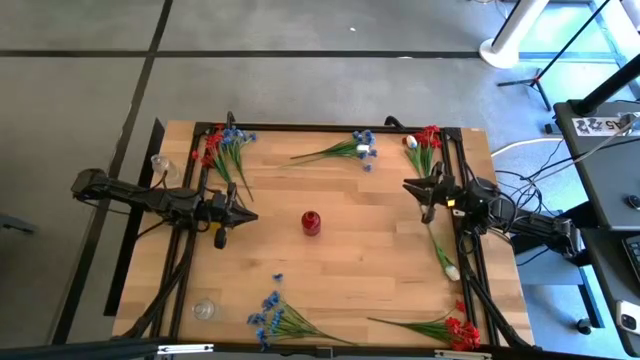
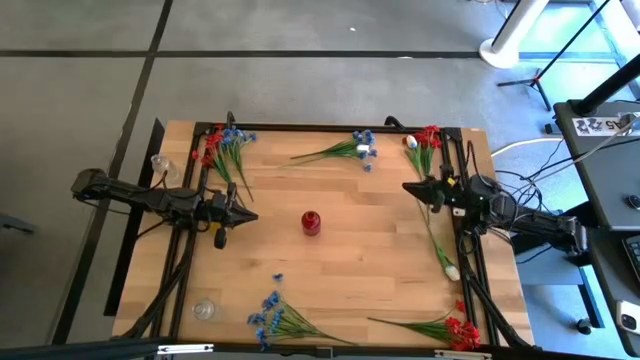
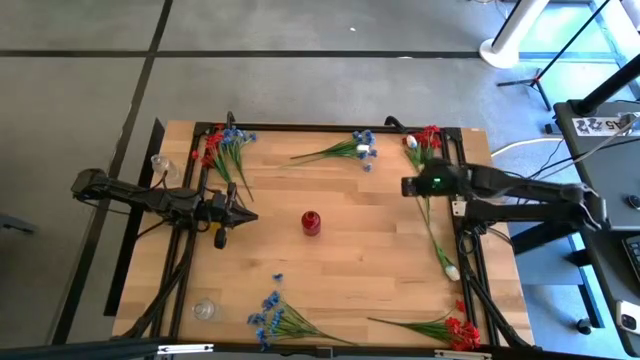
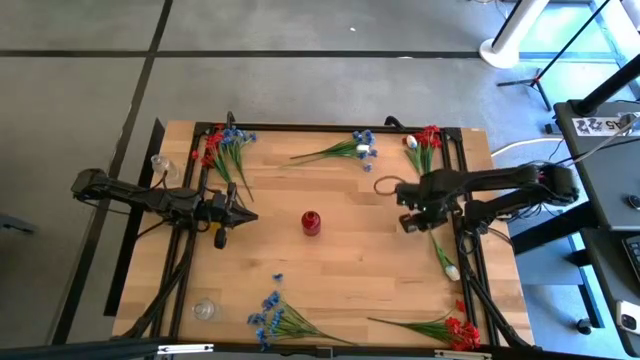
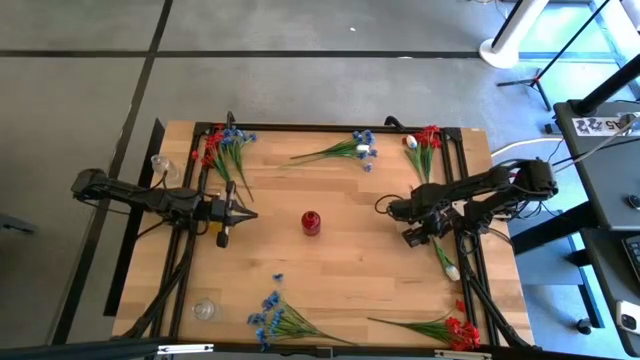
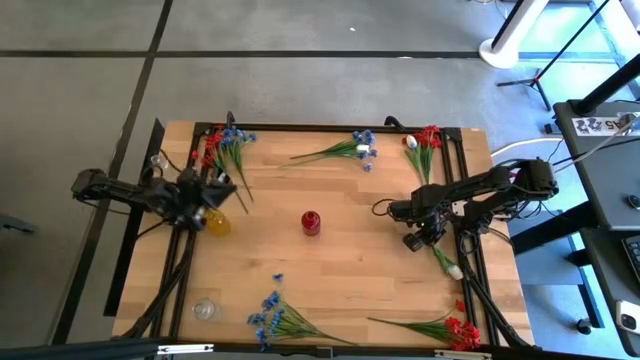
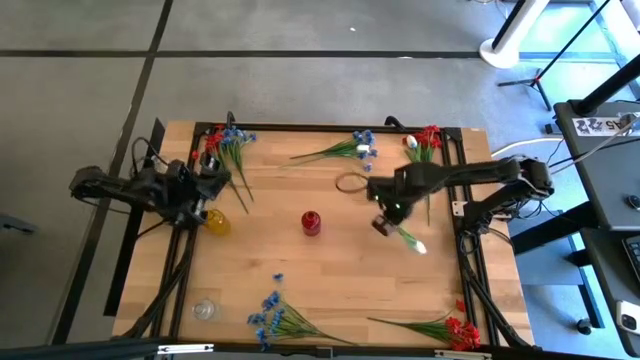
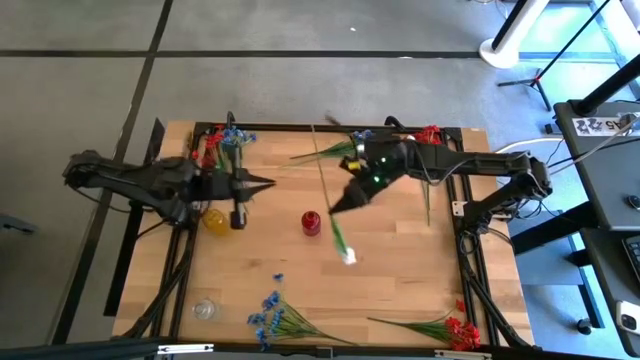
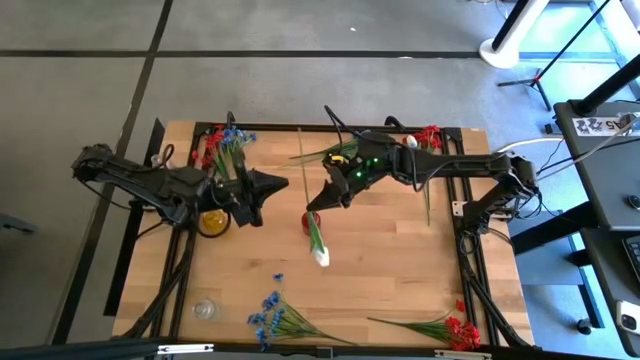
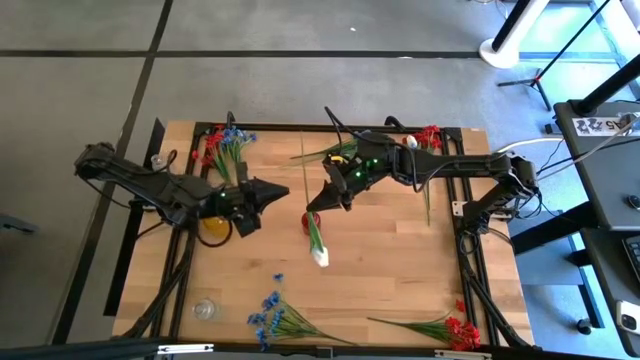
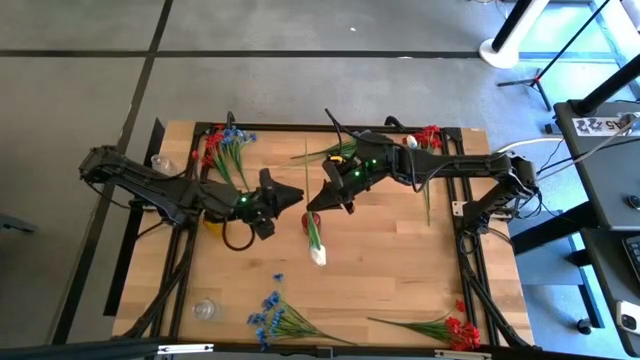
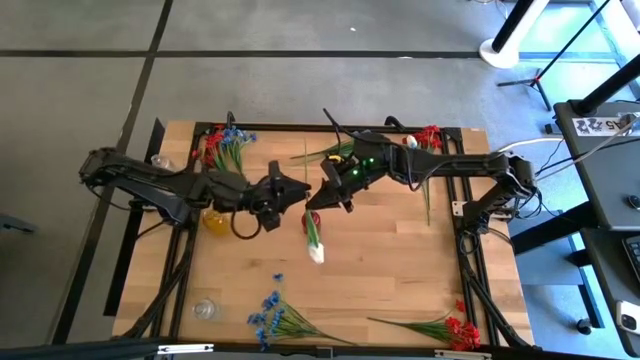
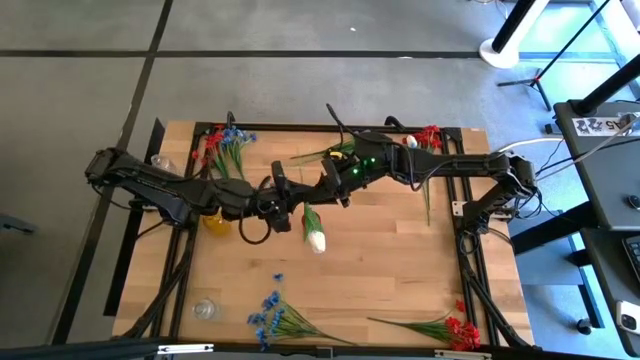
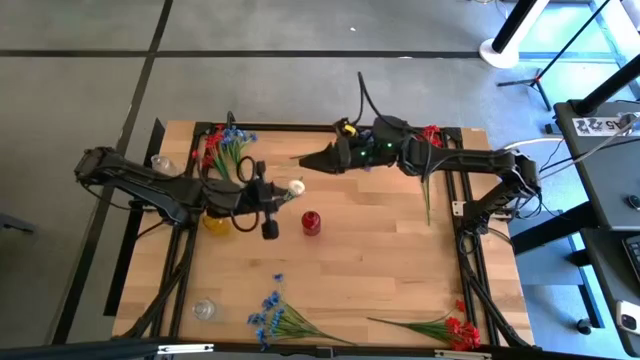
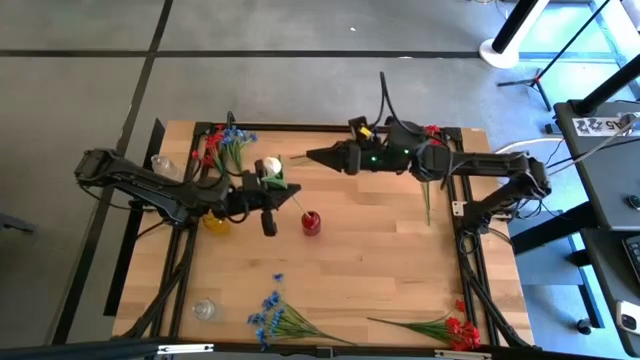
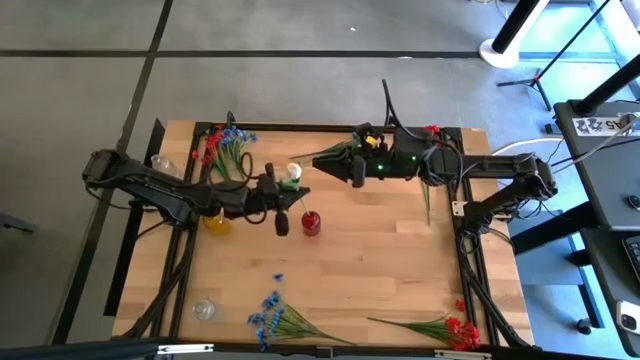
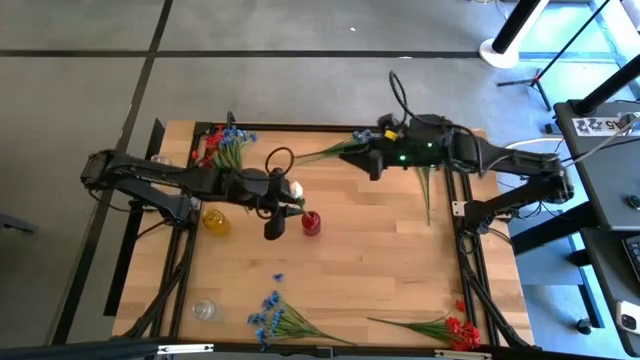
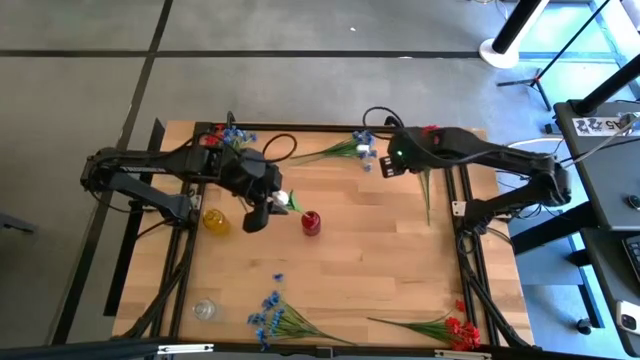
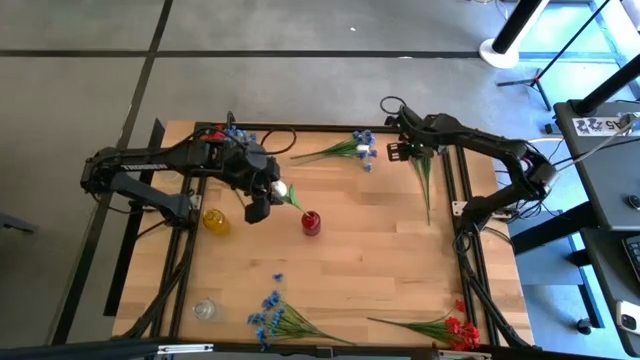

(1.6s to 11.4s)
Task: Sort flowers into vase by color
Put the bottom right white flower into the red vase

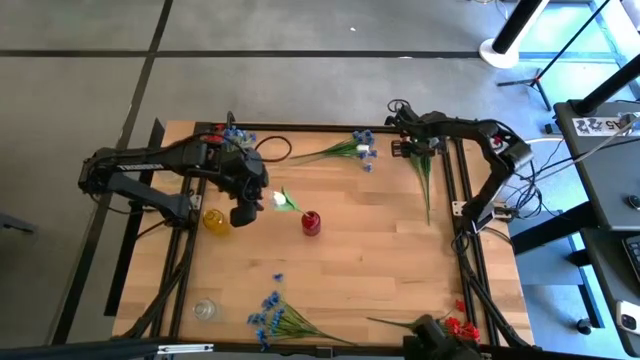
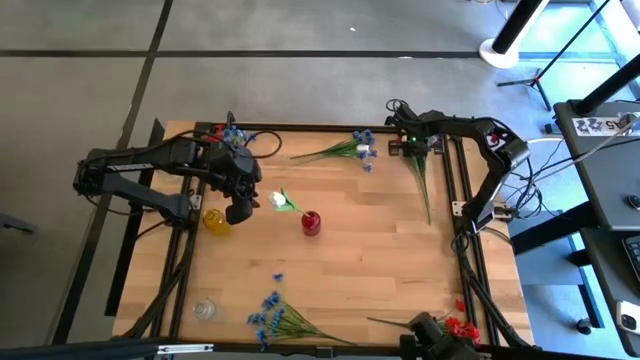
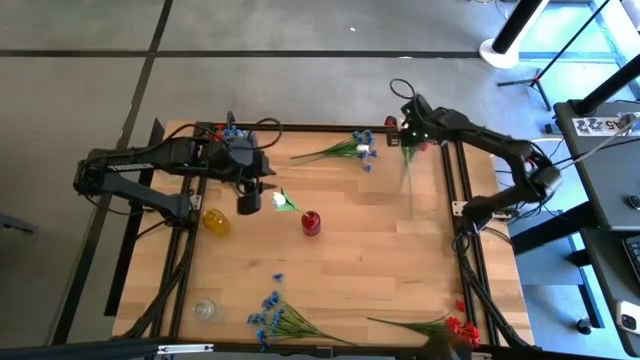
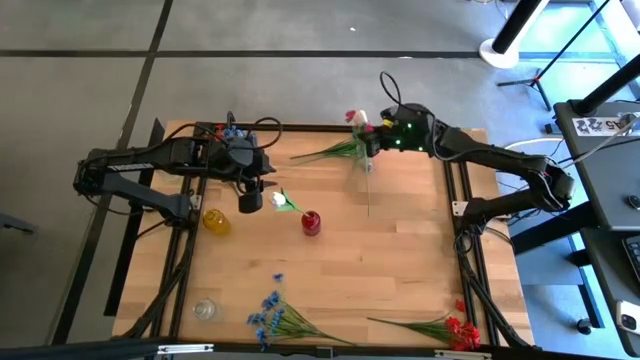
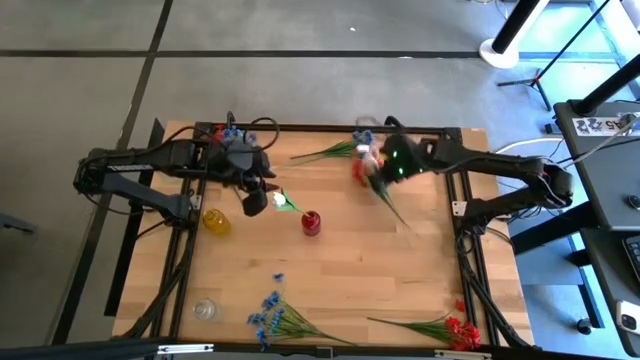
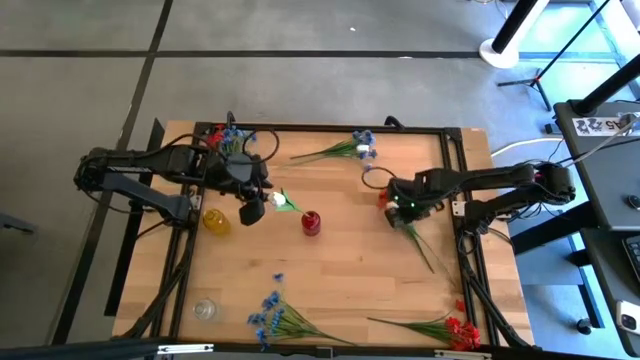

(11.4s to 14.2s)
Put the right white flower into the red vase

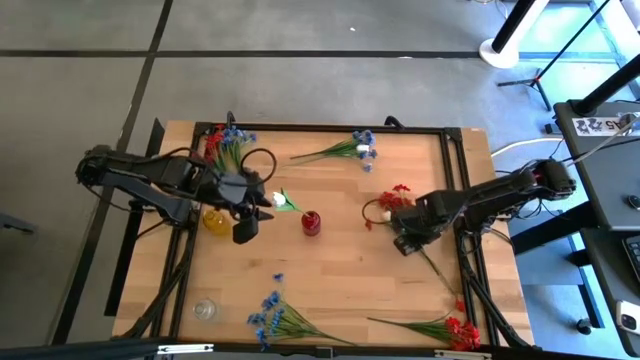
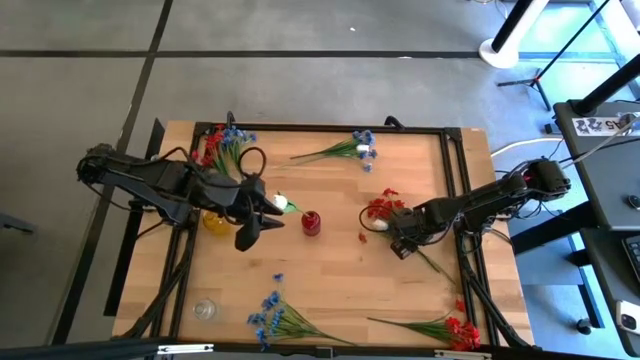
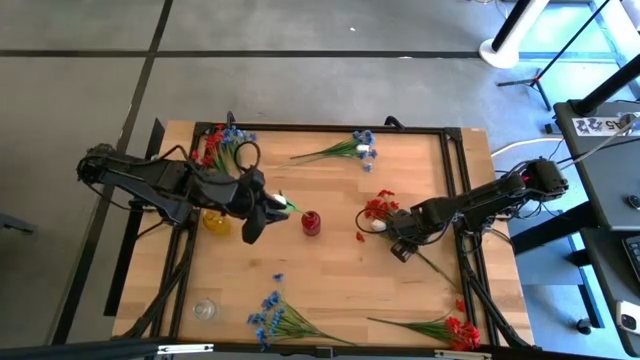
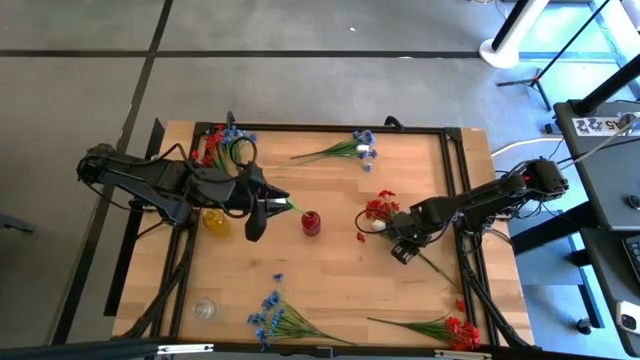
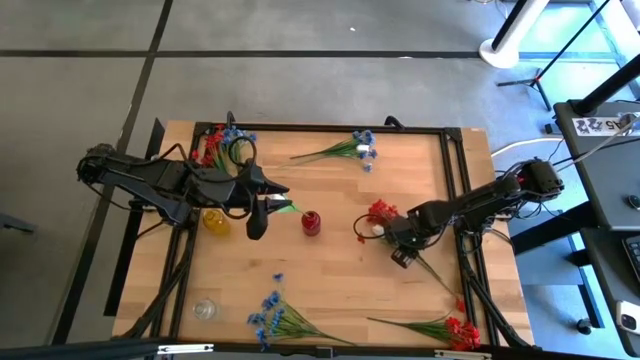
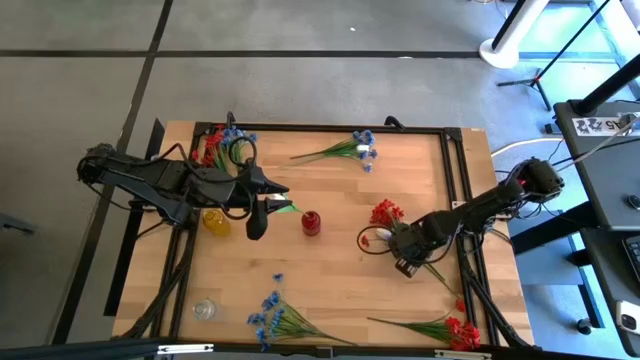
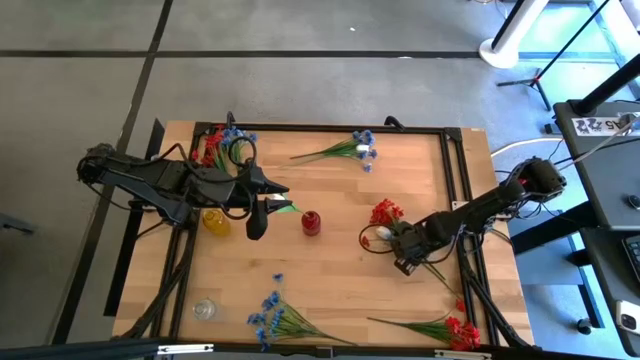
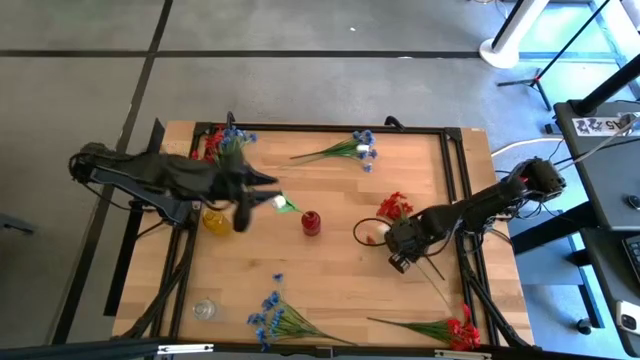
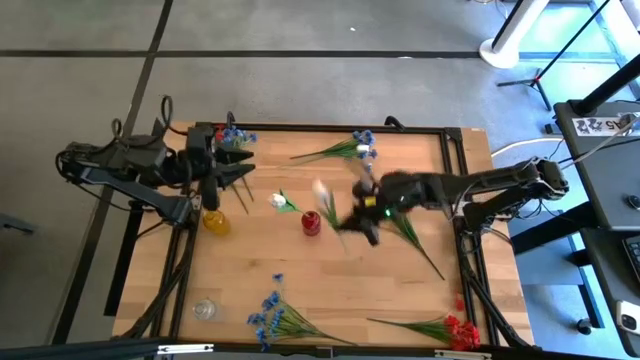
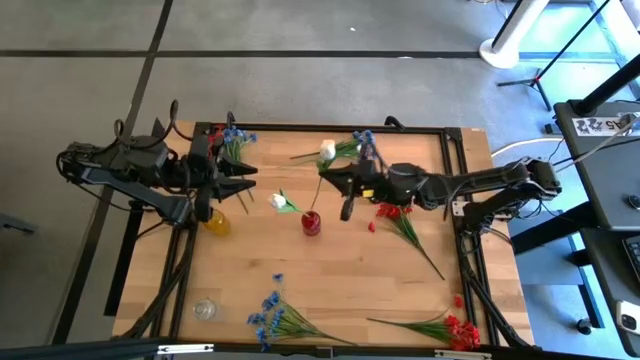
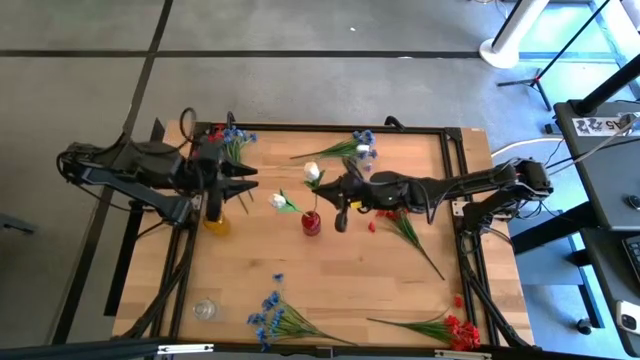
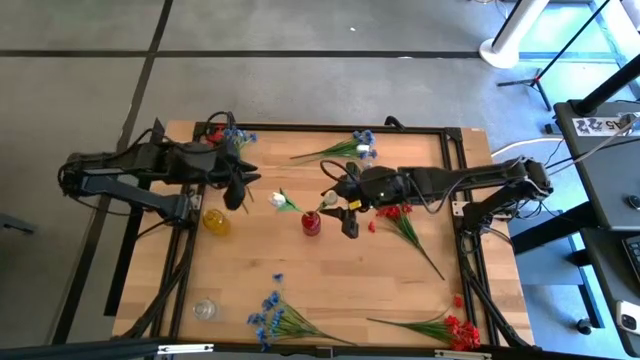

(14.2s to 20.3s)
Put the bottom white flower into the red vase
